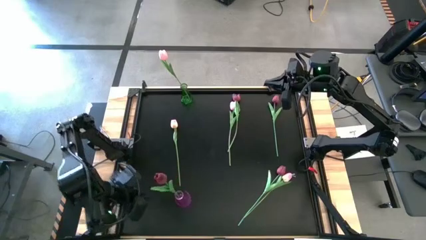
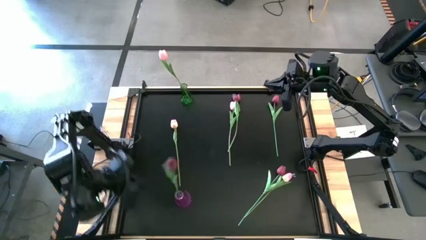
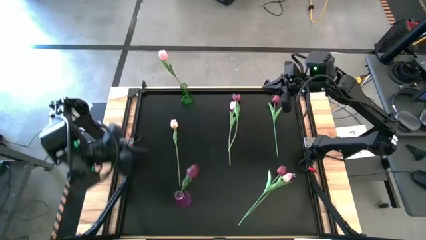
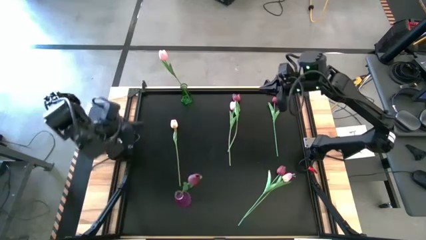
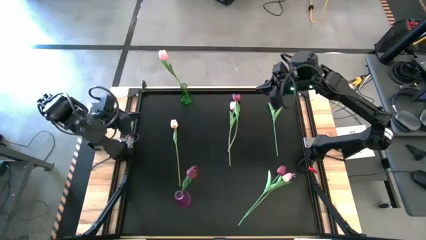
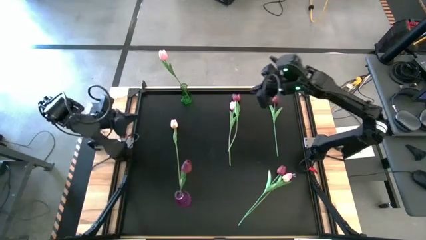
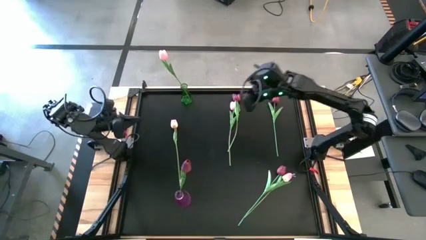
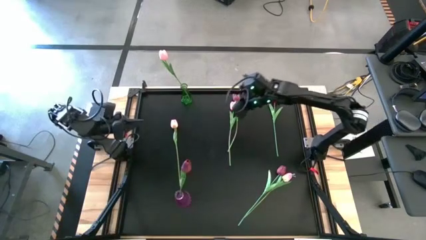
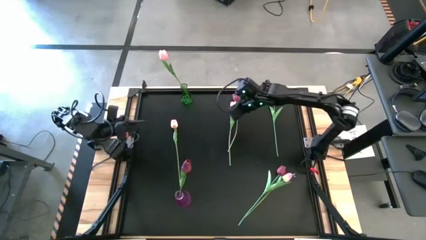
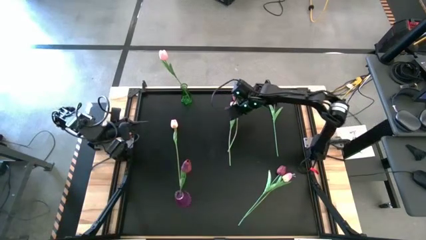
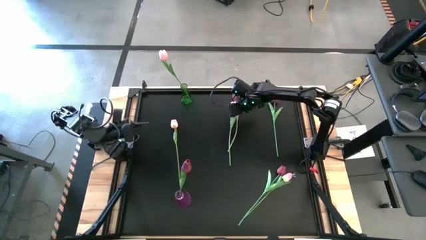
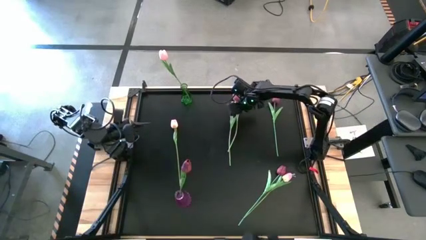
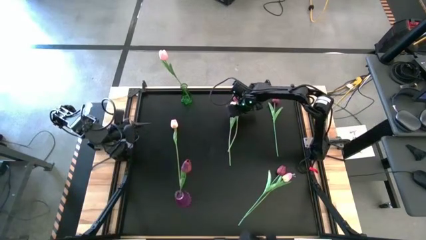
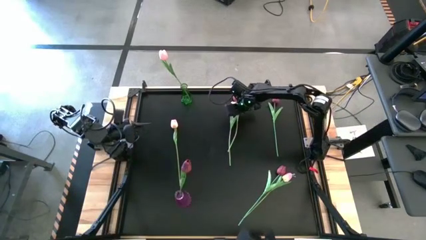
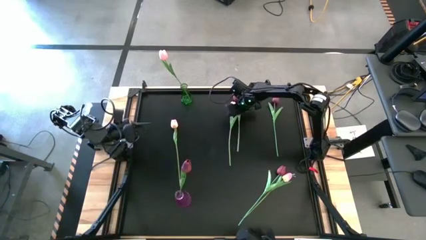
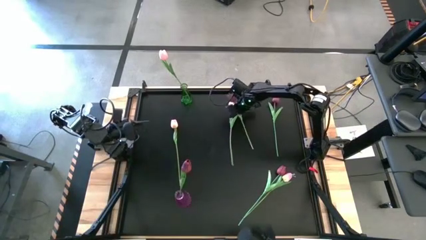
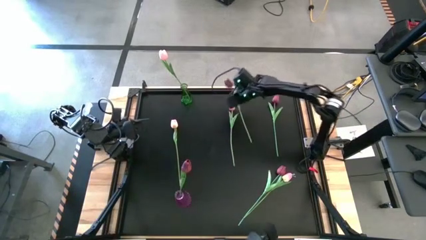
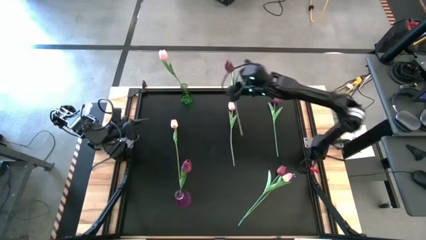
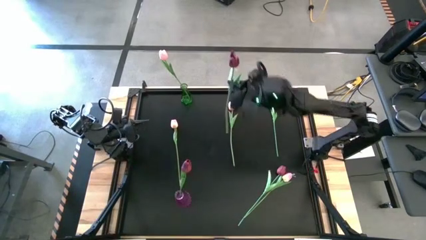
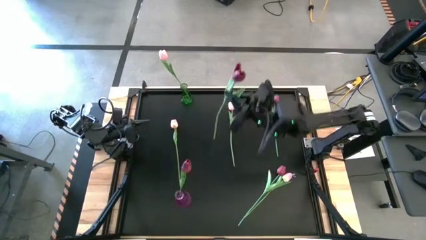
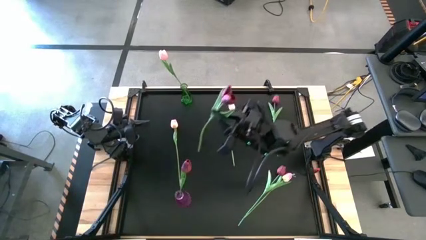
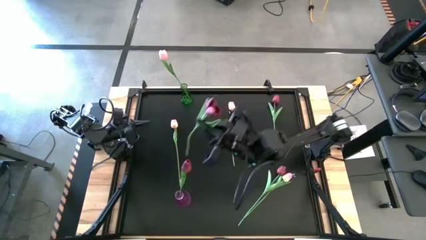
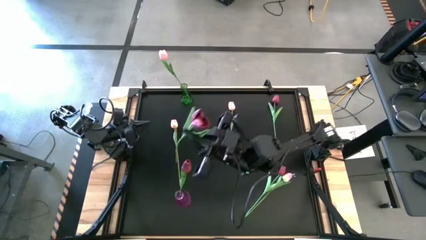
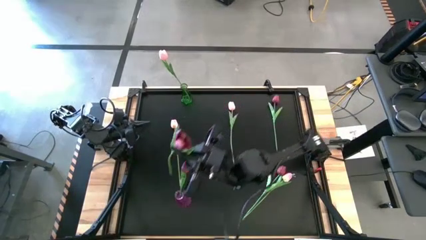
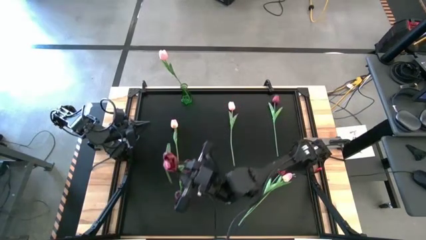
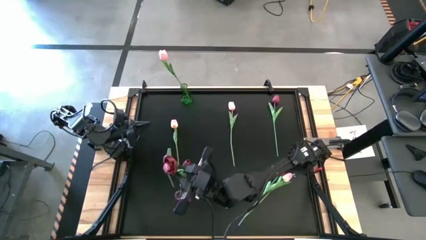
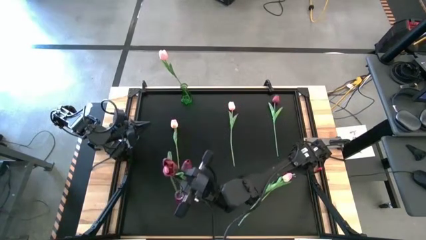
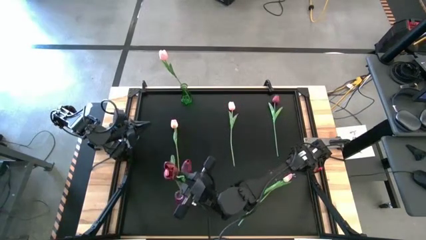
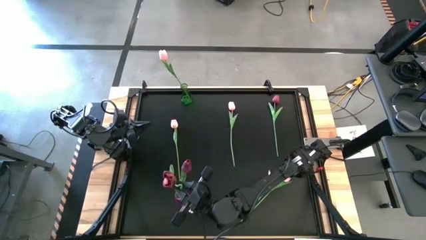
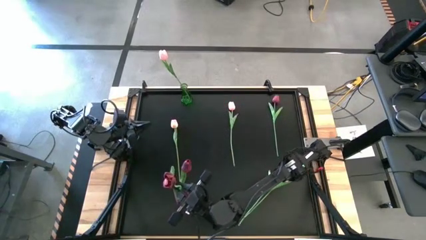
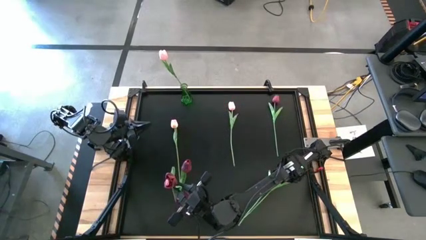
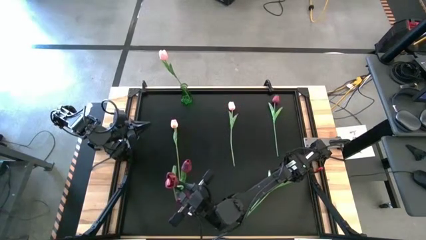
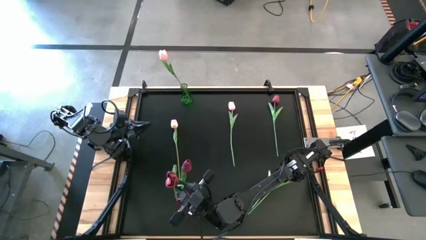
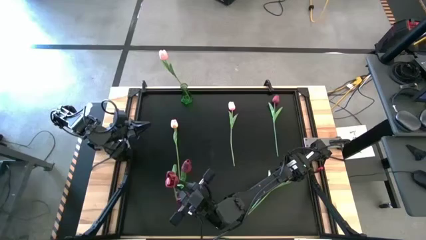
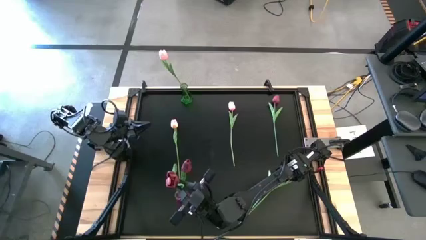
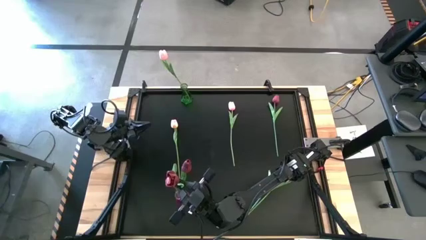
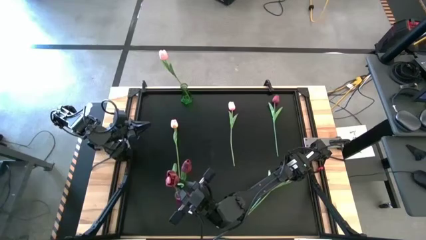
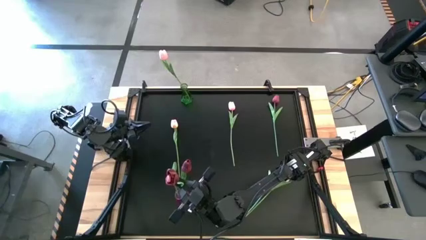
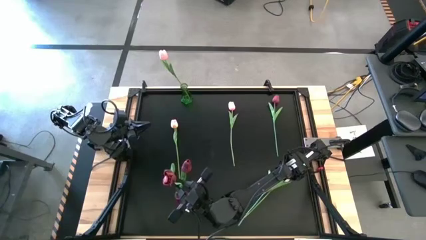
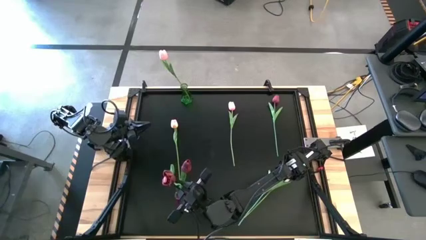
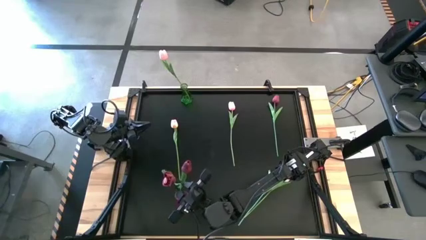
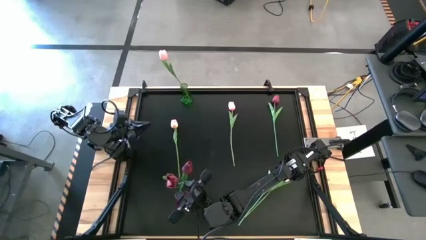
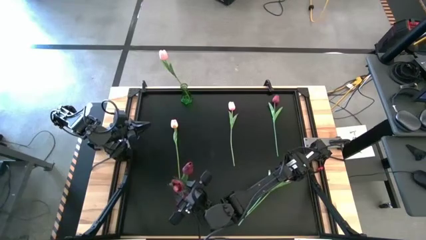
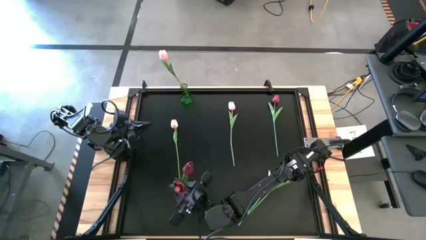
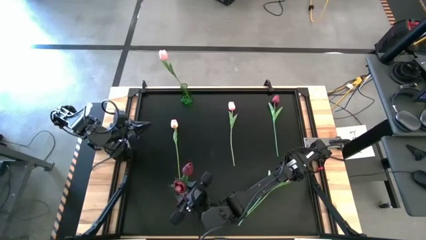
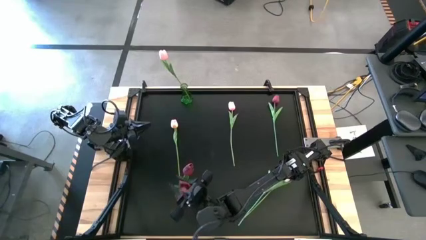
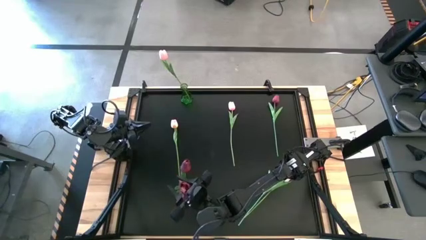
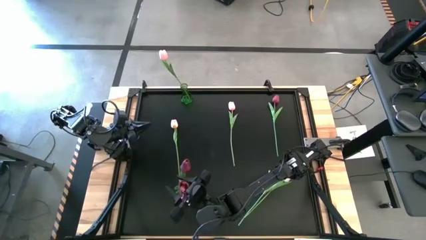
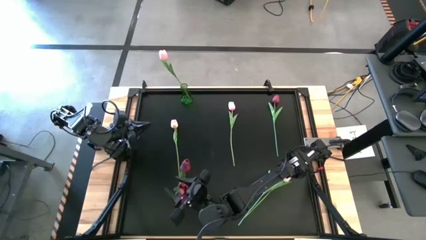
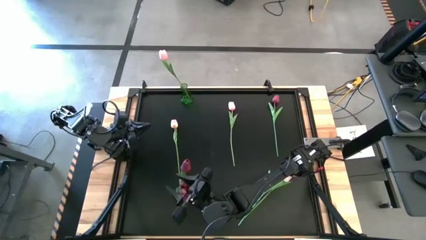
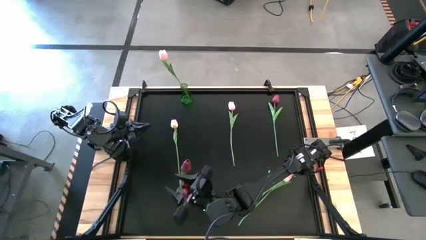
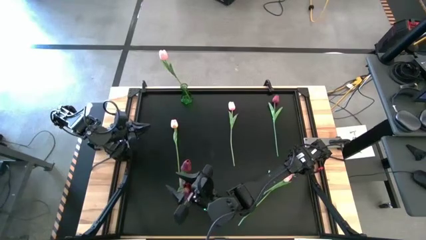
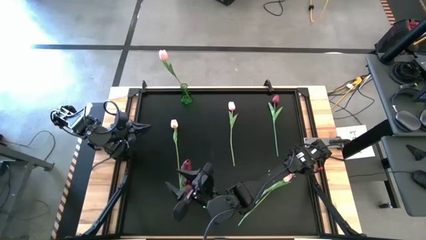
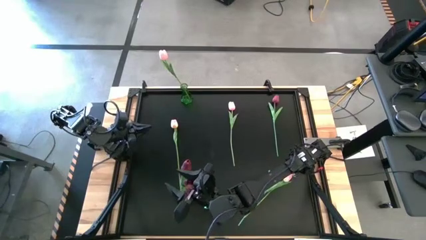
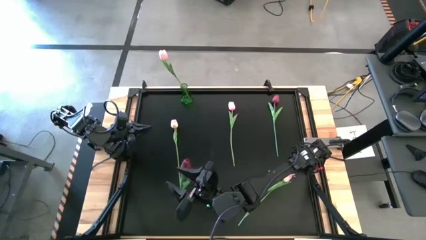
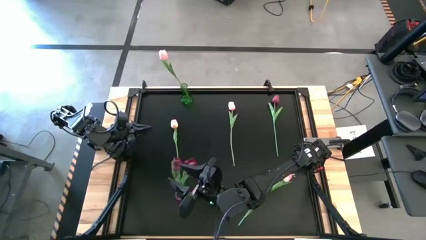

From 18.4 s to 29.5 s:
Task: Sort flowers into vase by color
Put the top left red tulip into the purple vase

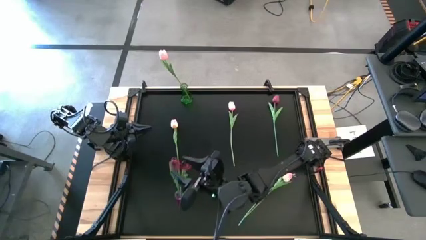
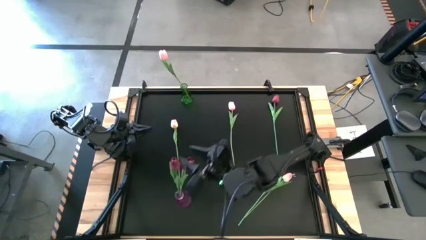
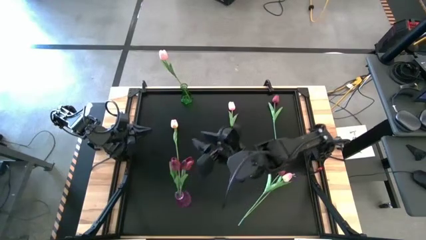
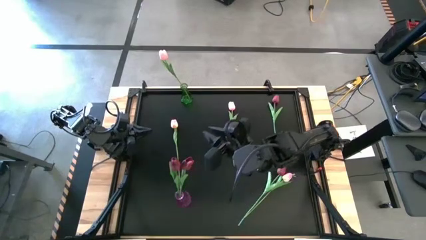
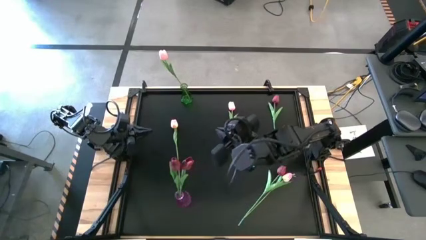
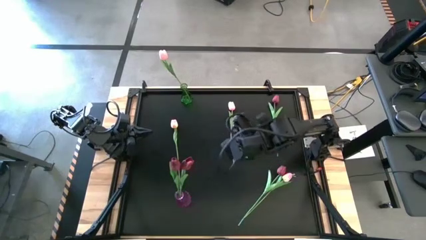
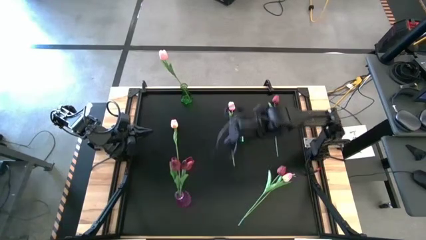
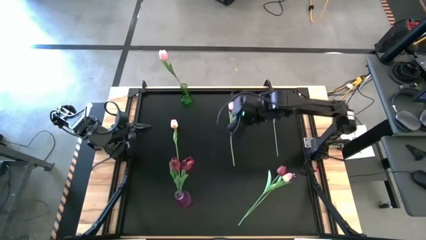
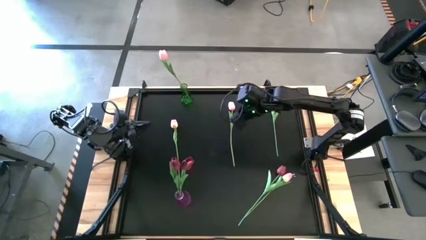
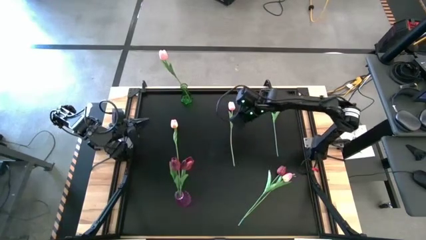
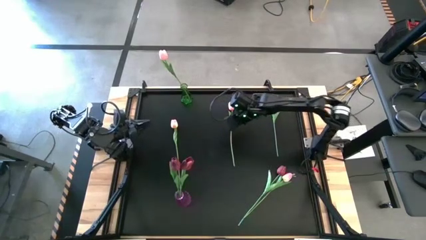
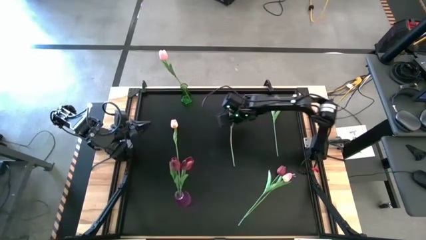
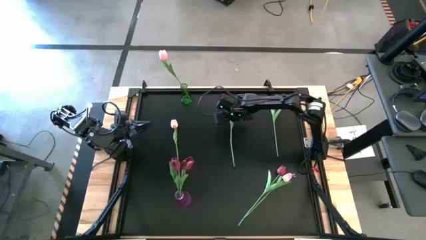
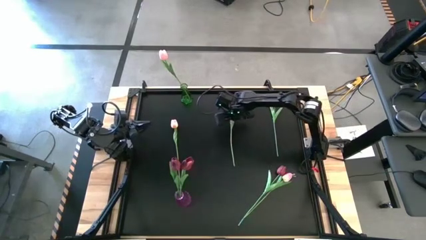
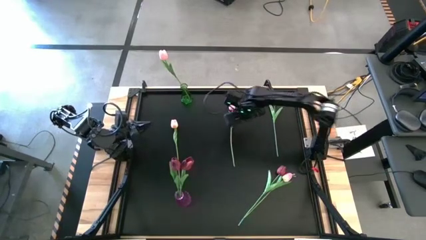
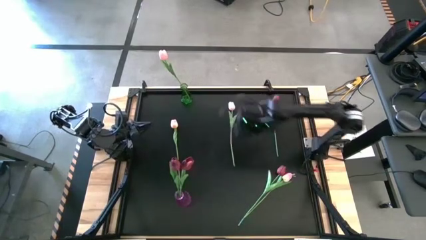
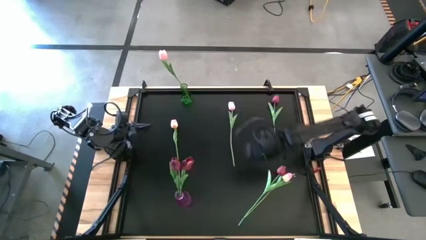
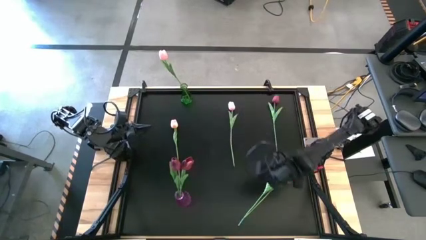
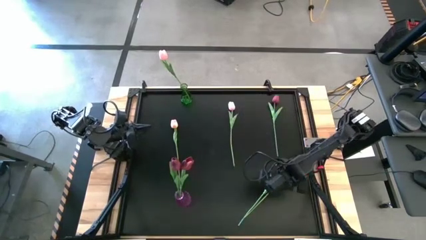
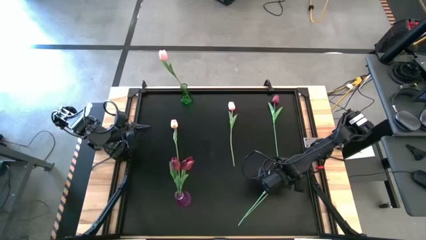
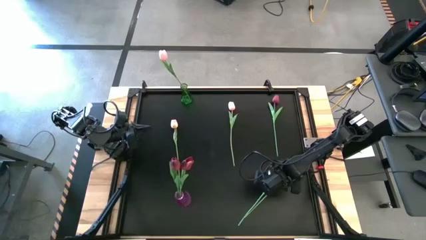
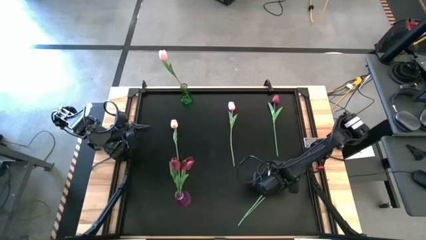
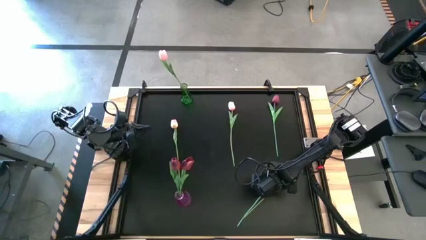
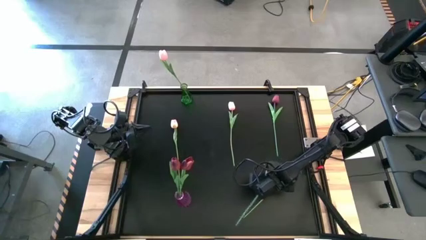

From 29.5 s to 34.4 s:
Adjust the bottom red tulip
